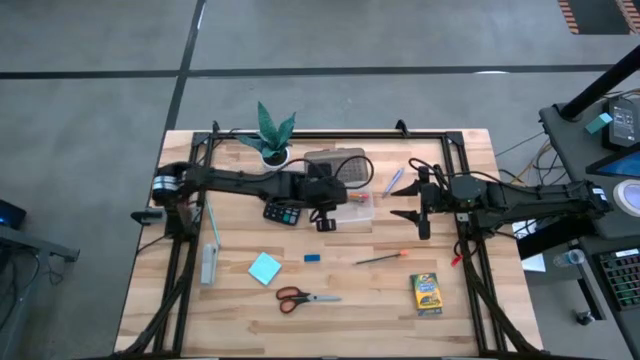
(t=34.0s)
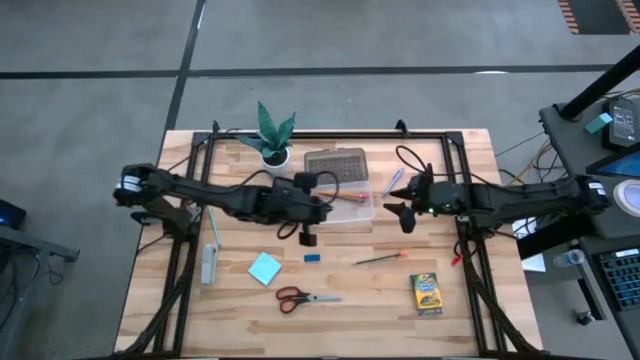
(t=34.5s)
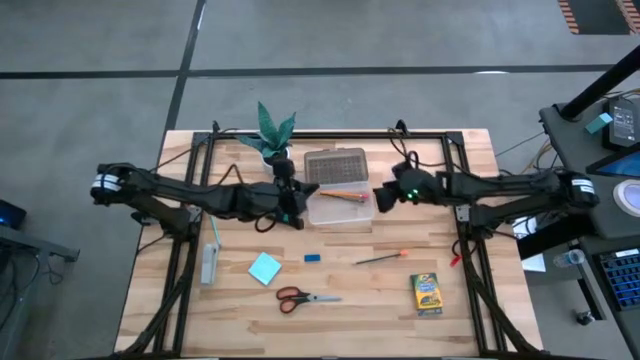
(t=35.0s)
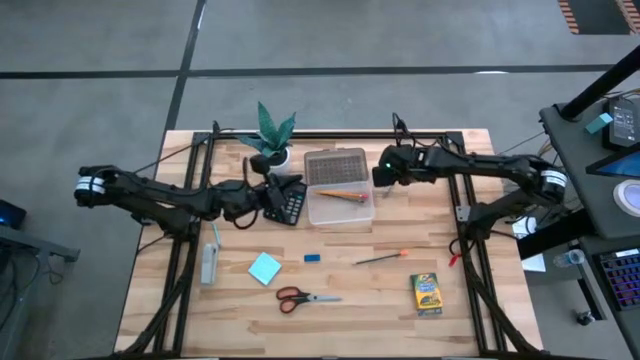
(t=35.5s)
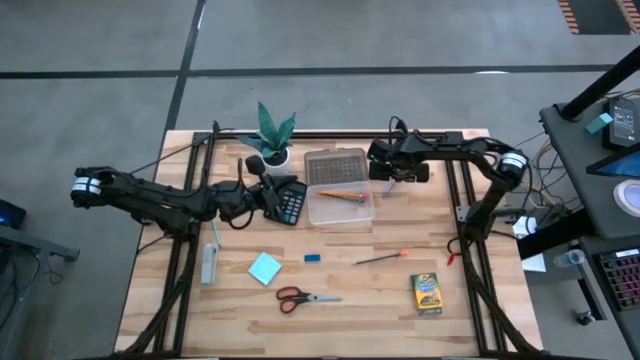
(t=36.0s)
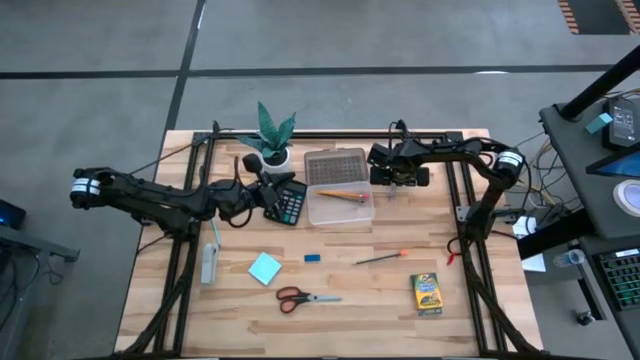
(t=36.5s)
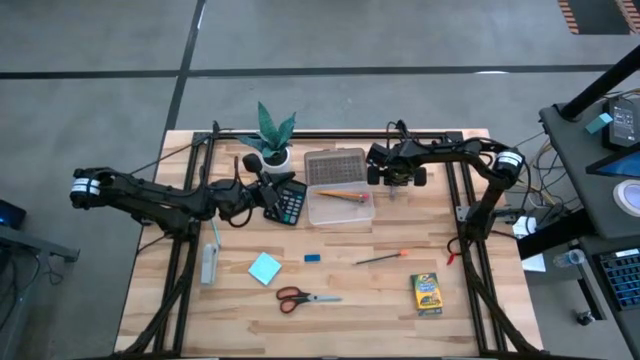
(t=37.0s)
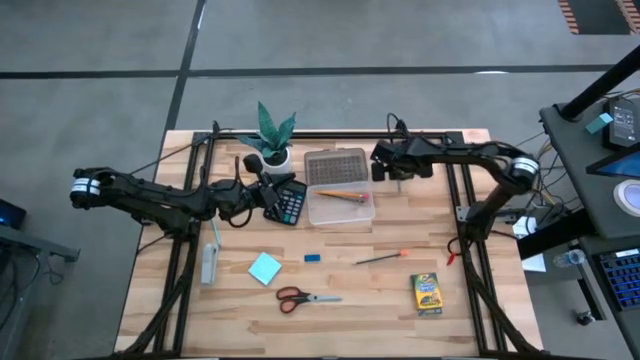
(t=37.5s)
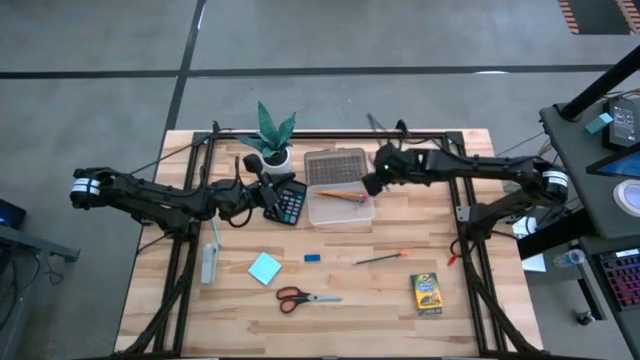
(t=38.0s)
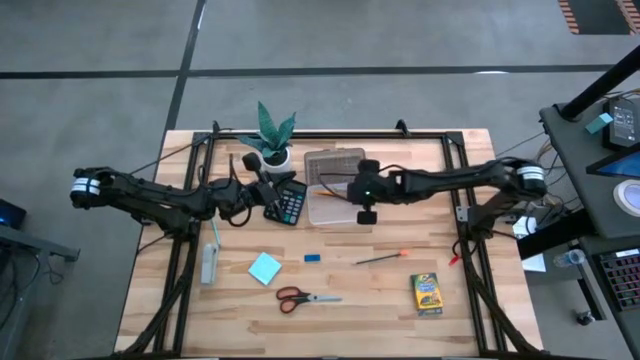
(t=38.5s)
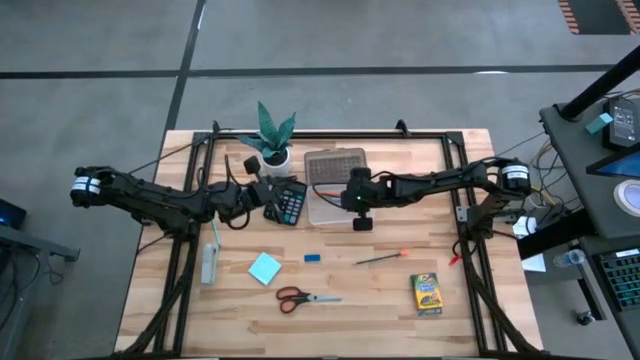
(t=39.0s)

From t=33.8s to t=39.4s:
Task: Pack school essentials
Put the light blue pen into the supplies box

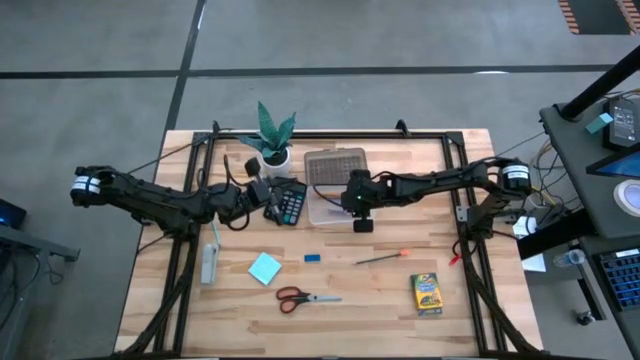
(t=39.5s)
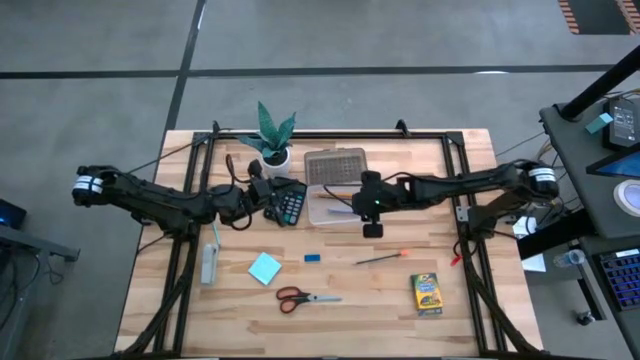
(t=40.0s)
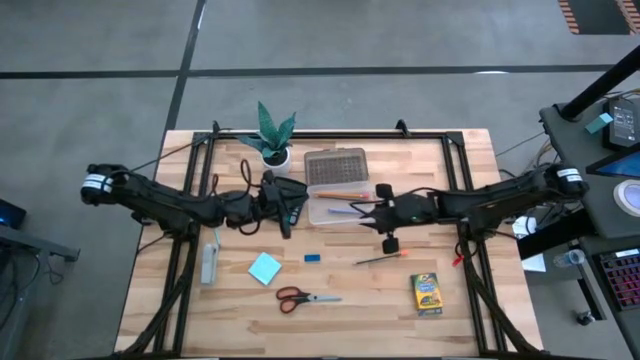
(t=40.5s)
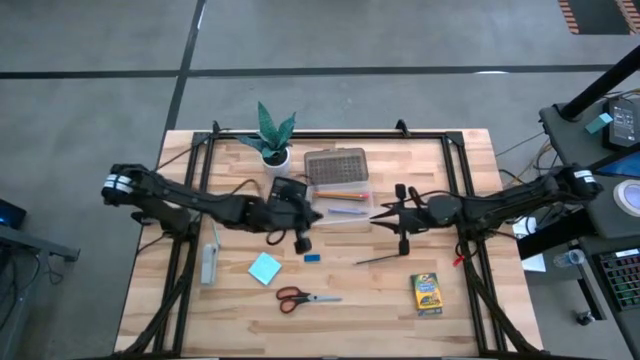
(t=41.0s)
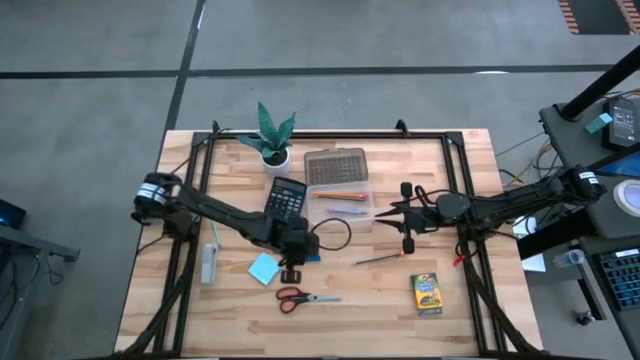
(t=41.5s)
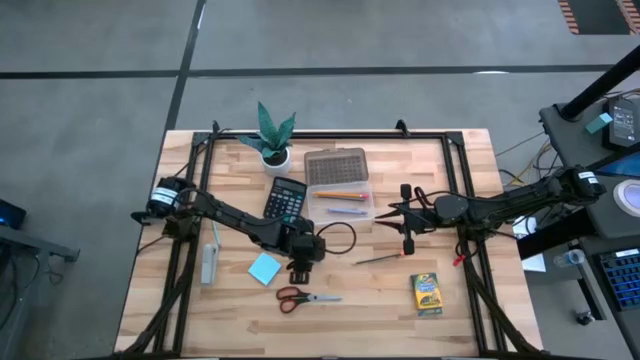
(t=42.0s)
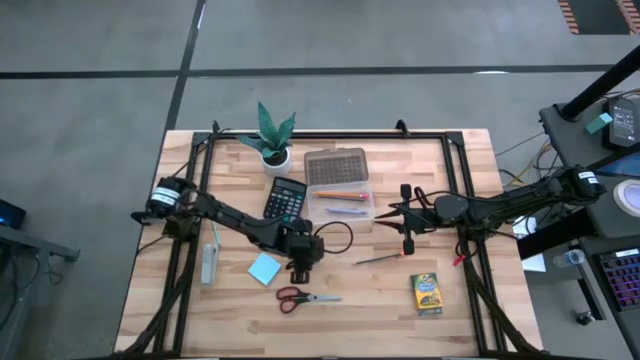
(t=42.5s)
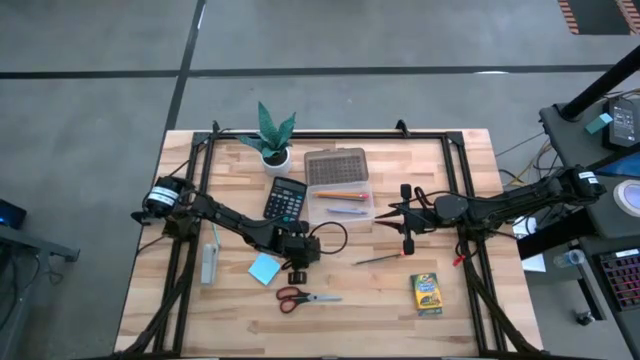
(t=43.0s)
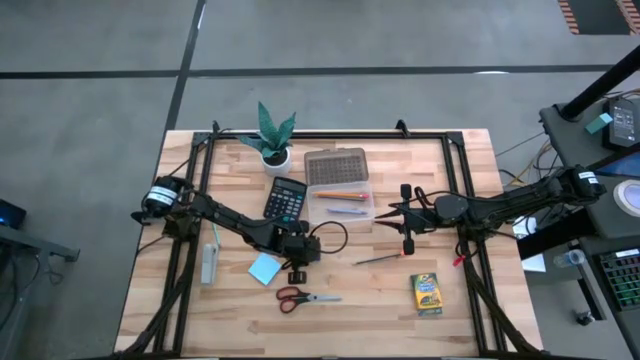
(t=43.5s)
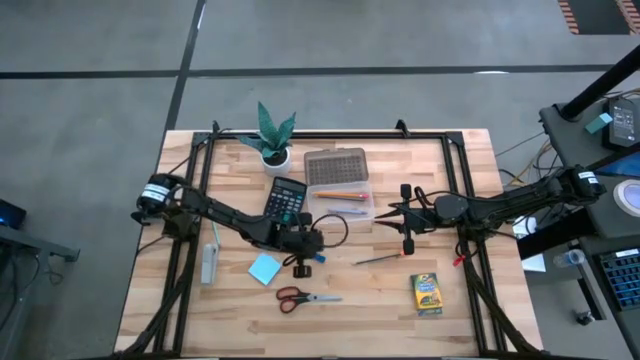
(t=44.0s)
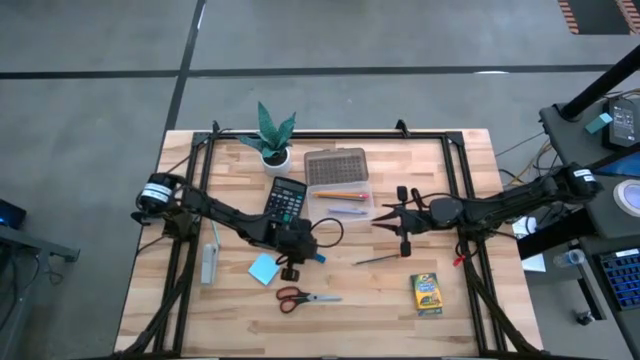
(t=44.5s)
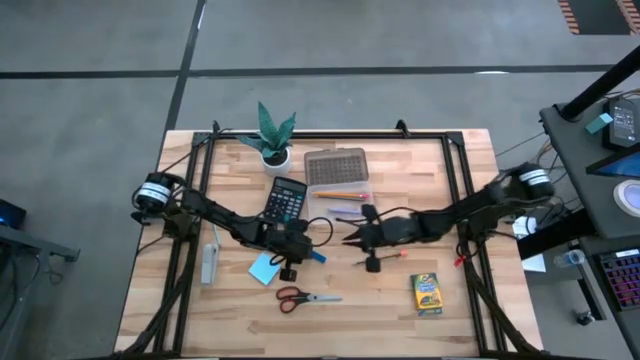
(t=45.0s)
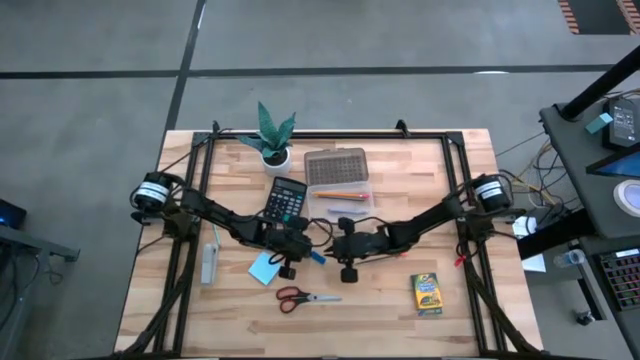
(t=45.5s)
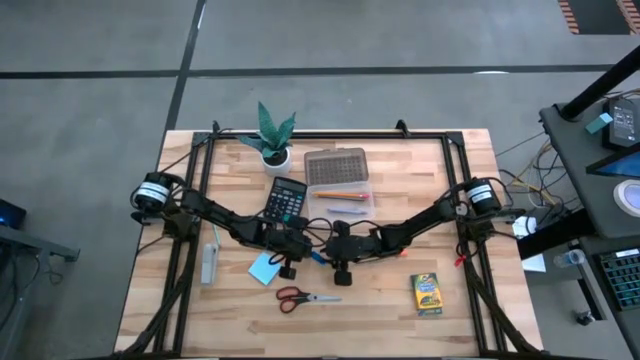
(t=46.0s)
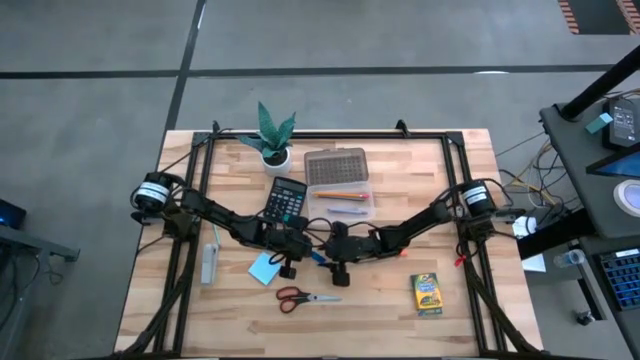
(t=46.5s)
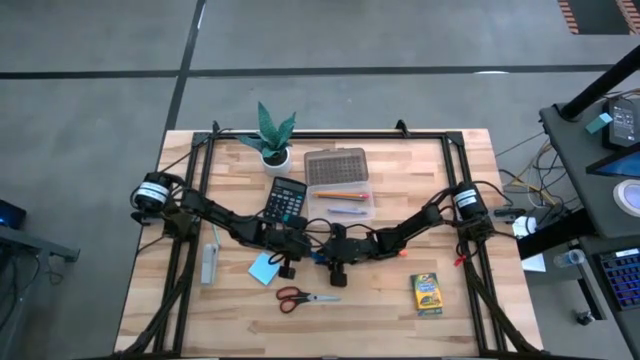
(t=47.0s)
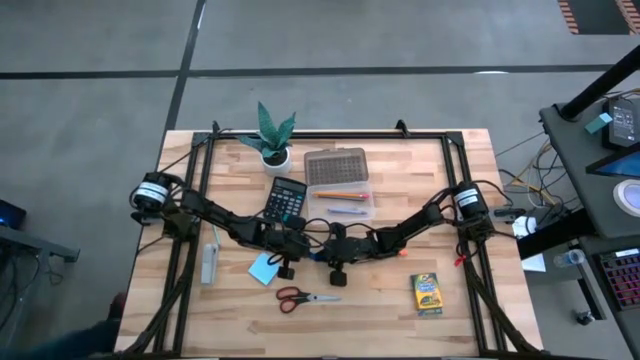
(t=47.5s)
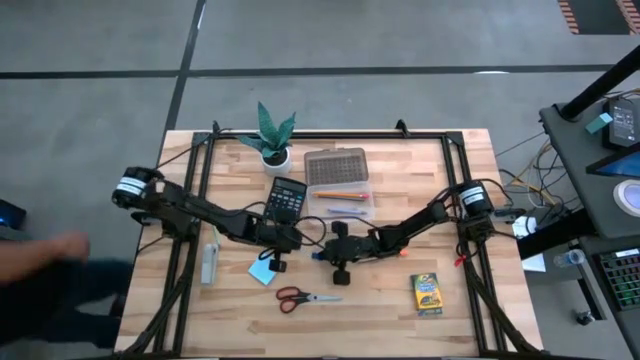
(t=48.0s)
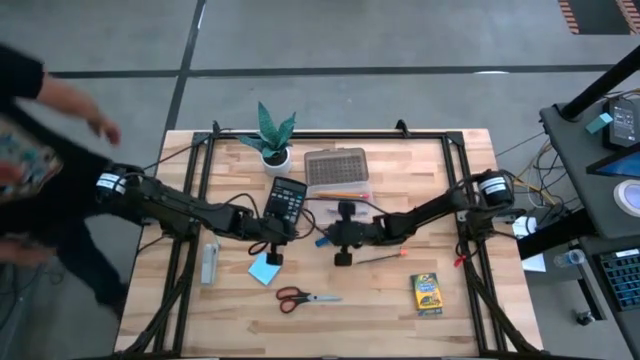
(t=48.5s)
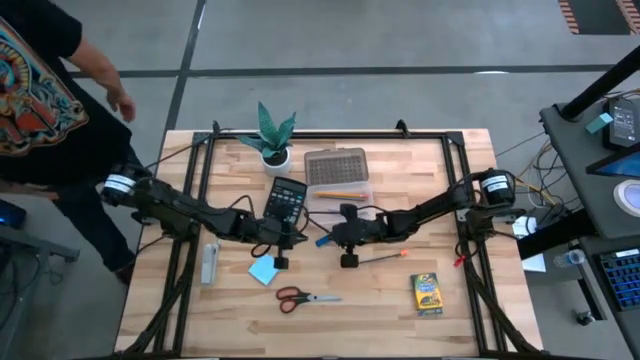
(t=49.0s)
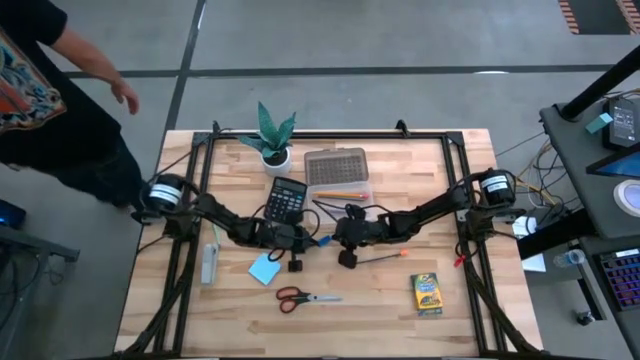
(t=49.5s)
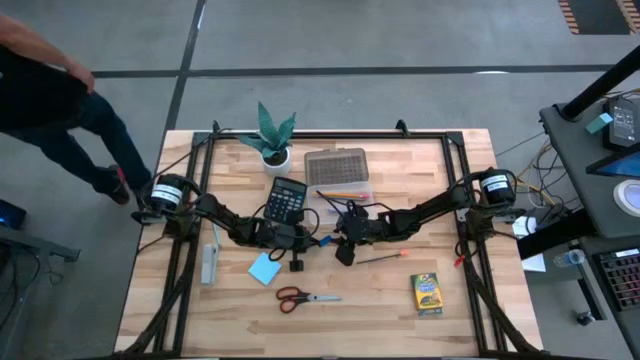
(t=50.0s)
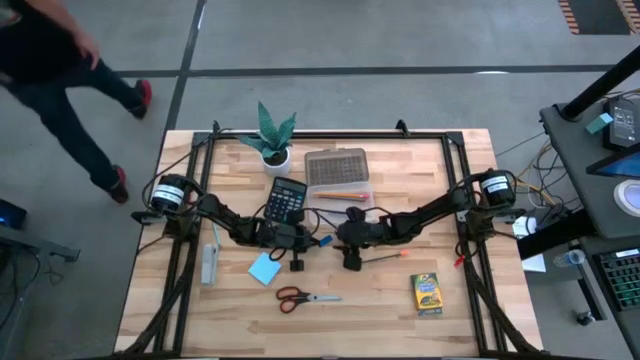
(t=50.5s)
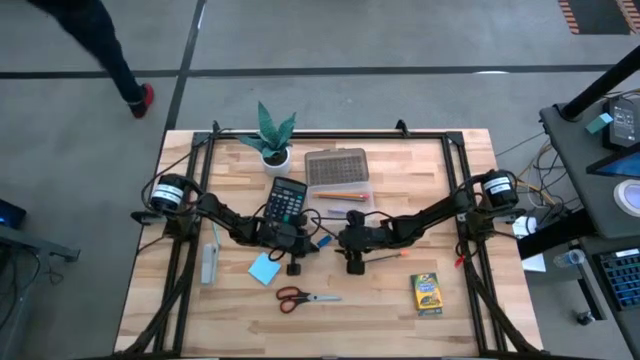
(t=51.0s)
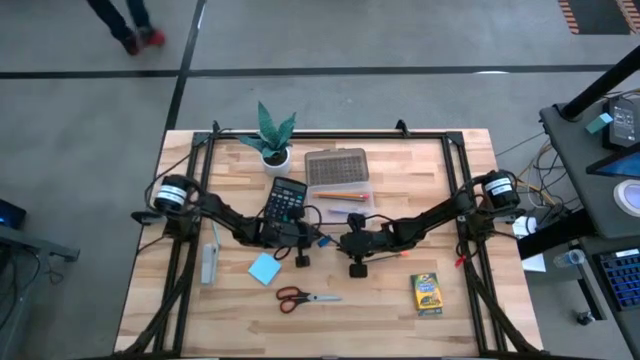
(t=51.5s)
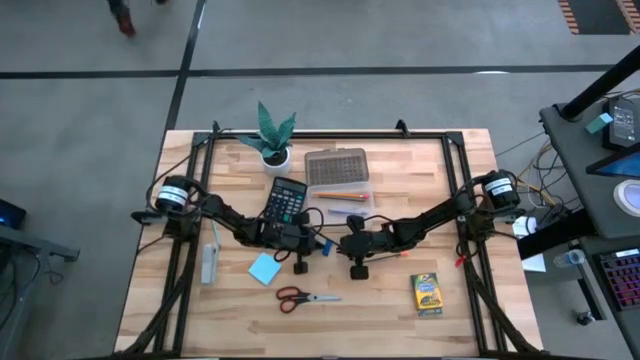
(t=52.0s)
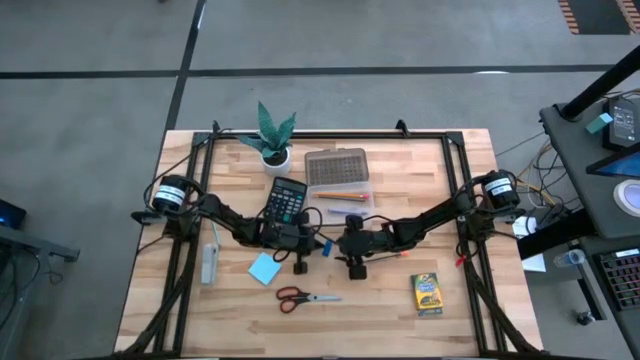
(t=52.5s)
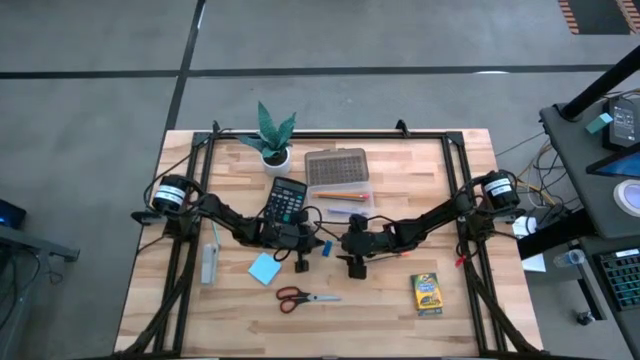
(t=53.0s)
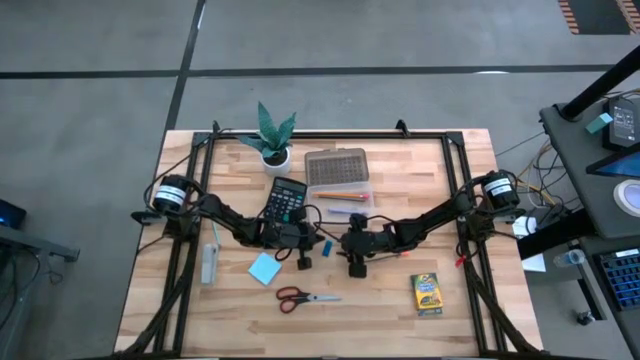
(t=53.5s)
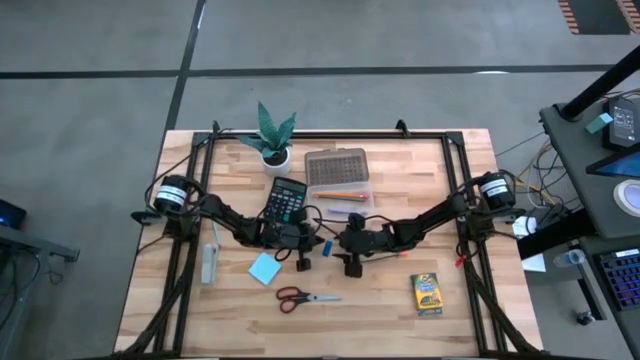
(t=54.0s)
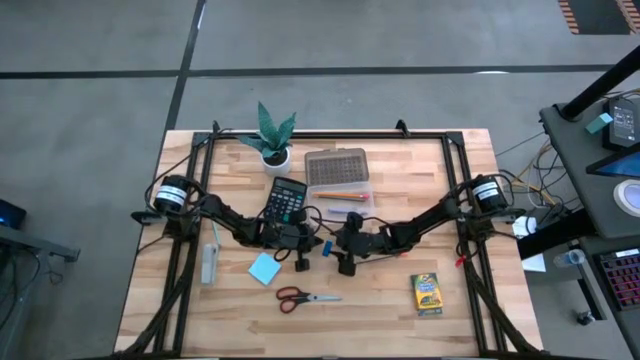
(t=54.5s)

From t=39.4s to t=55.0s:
Put the blue eraser into the supplies box
